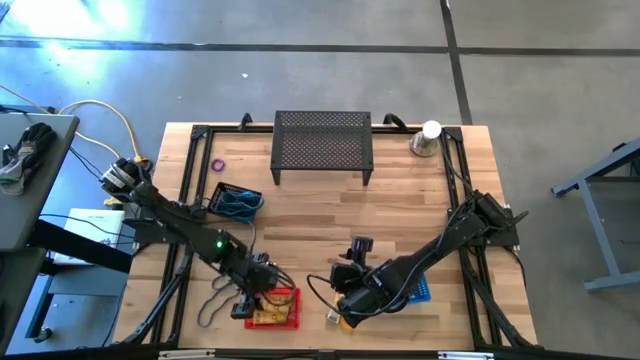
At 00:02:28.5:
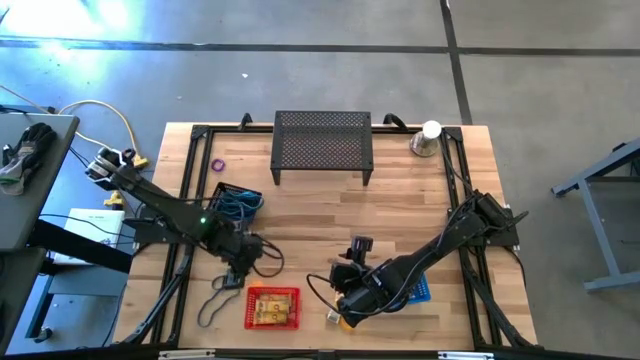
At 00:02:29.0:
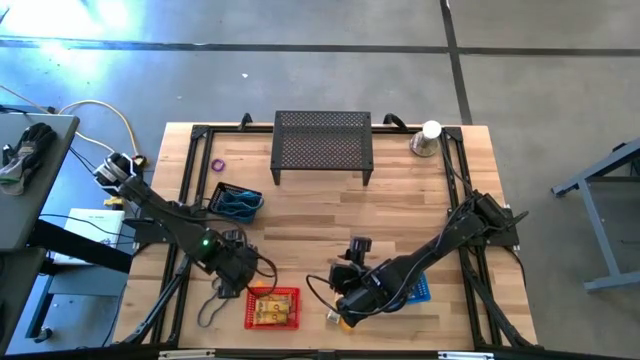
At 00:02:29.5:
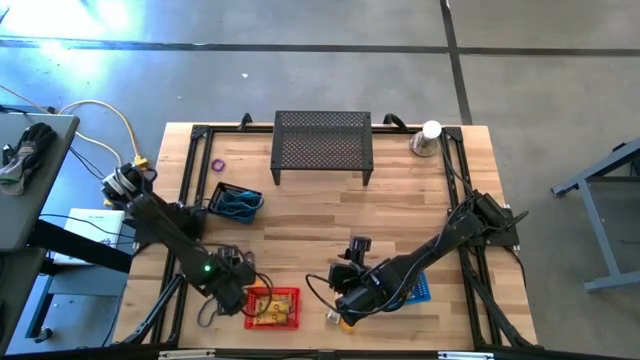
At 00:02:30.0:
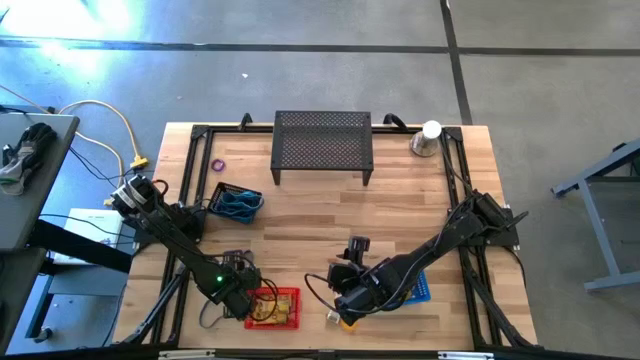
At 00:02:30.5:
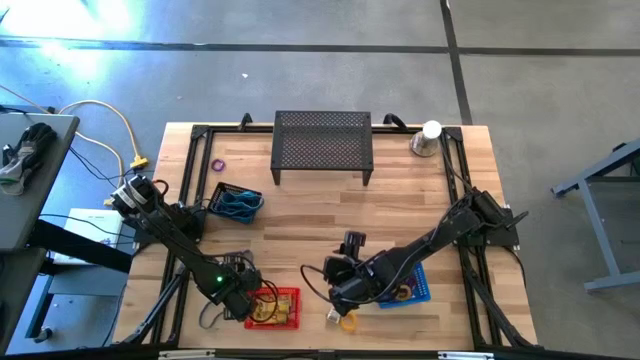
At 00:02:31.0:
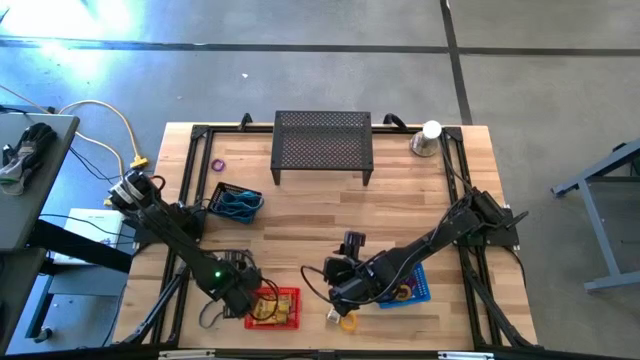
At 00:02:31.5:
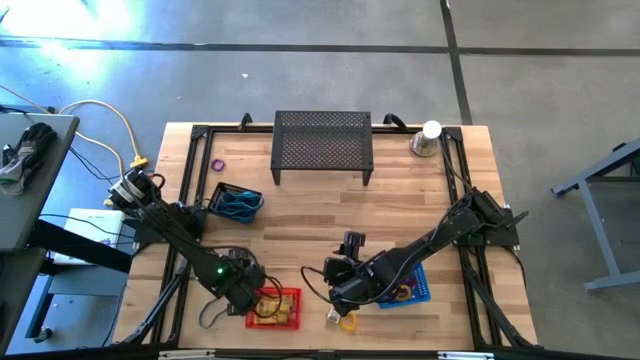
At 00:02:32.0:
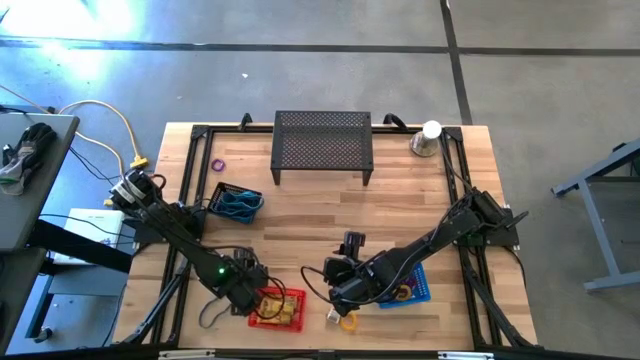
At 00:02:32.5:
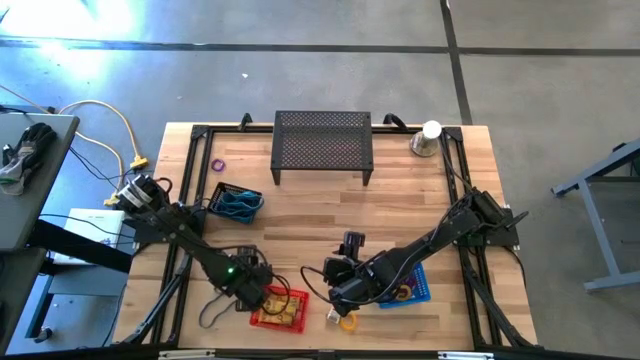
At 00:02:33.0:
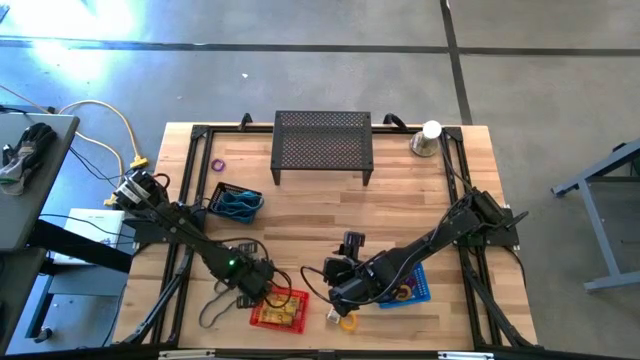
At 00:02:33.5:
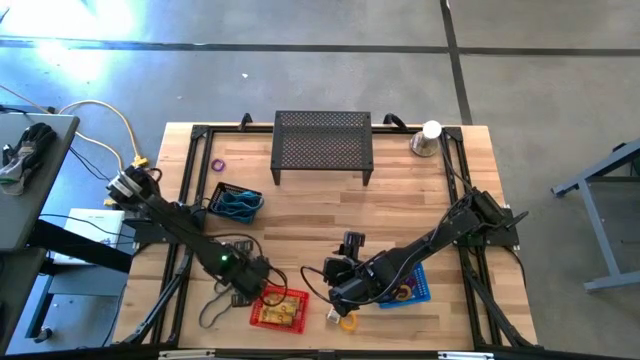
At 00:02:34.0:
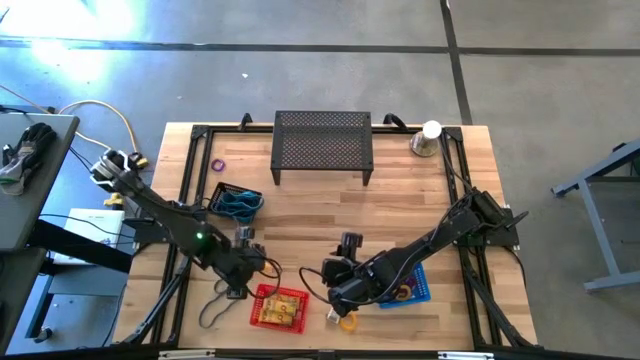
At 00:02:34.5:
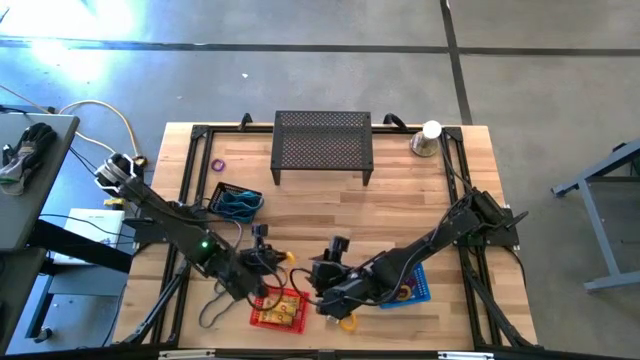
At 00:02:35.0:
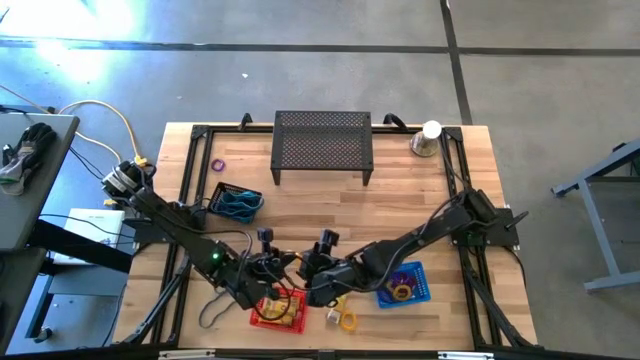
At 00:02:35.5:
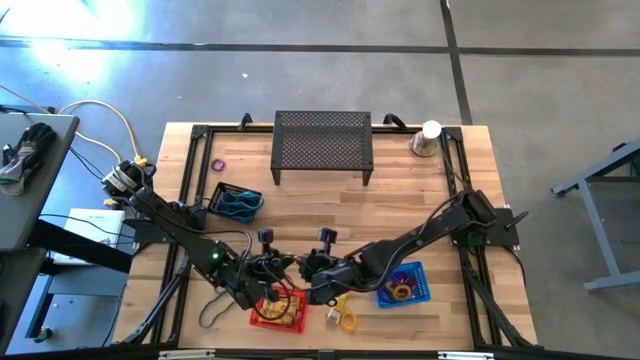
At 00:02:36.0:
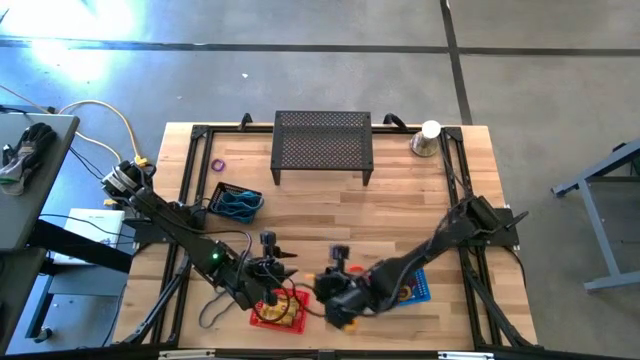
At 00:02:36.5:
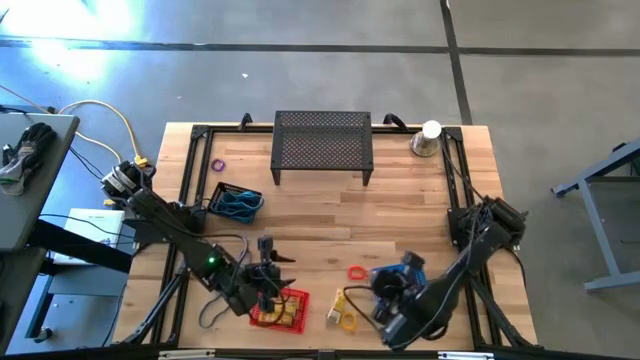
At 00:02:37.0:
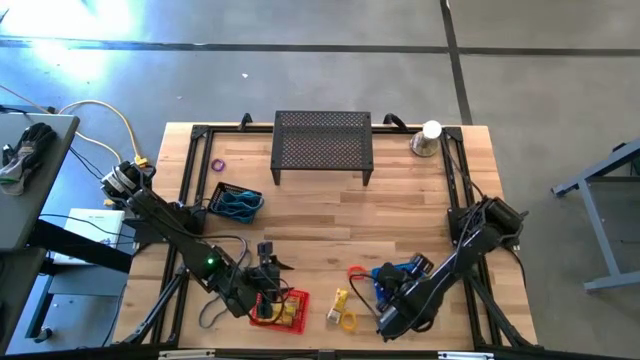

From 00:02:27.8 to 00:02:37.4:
Task: Pick & Place Office Desk Supplies
Put the yellow spring keychain into the blue bin

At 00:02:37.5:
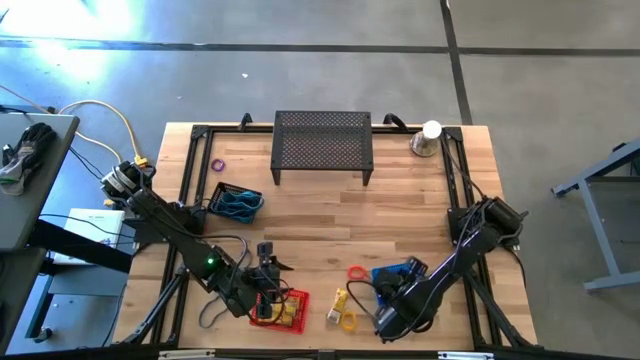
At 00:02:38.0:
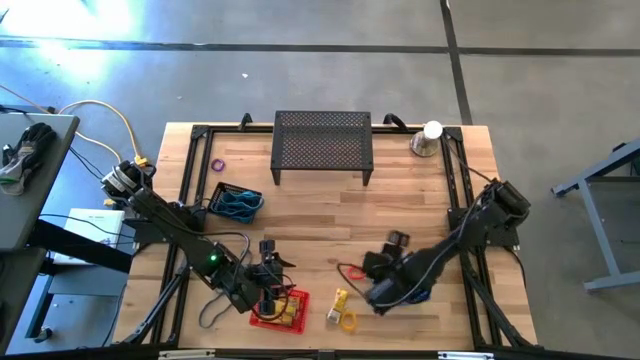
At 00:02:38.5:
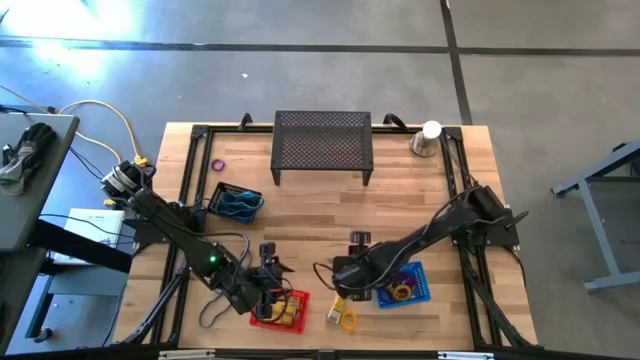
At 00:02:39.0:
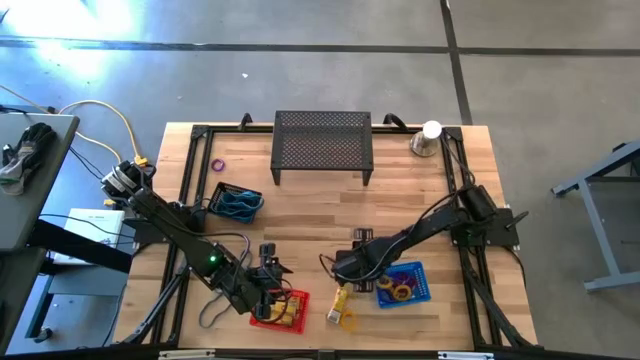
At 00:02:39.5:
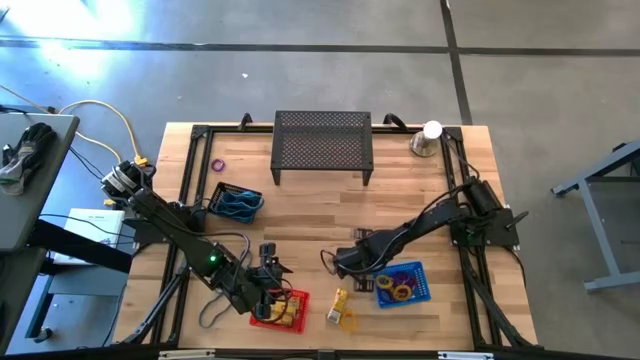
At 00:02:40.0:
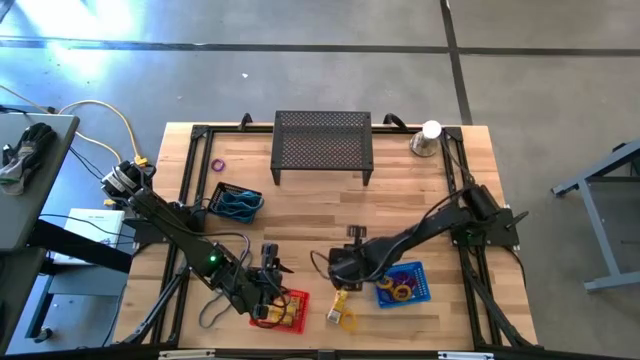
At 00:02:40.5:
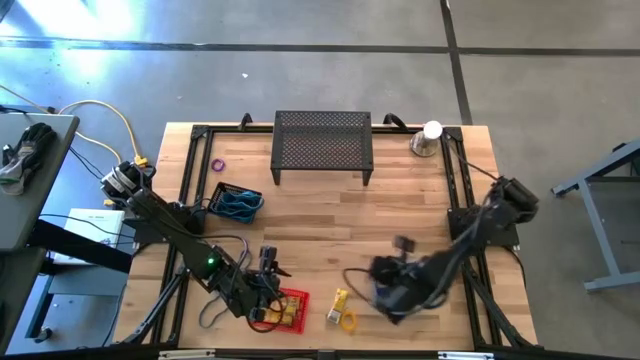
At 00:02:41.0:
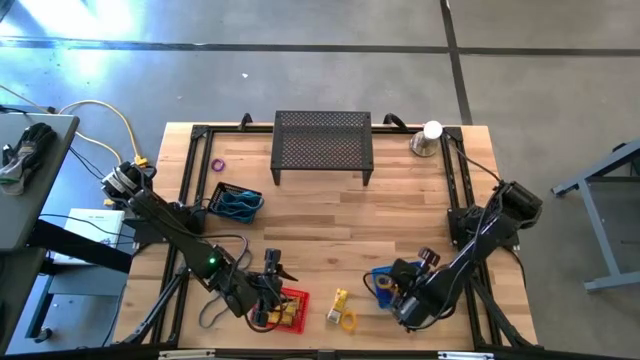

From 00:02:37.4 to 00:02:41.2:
Put the orange spring keychain into the blue bin

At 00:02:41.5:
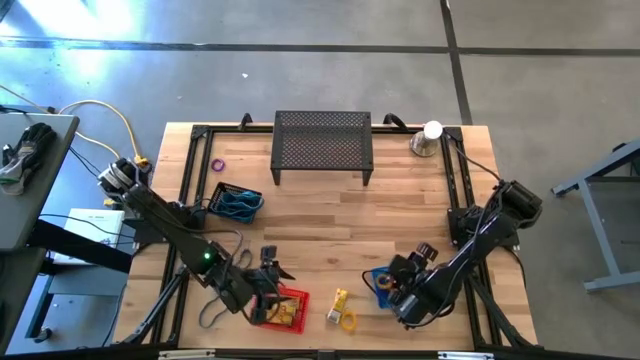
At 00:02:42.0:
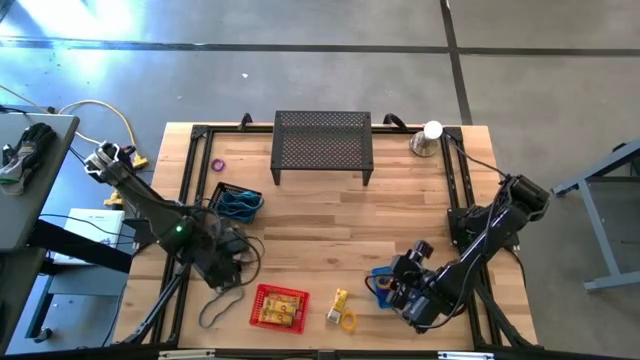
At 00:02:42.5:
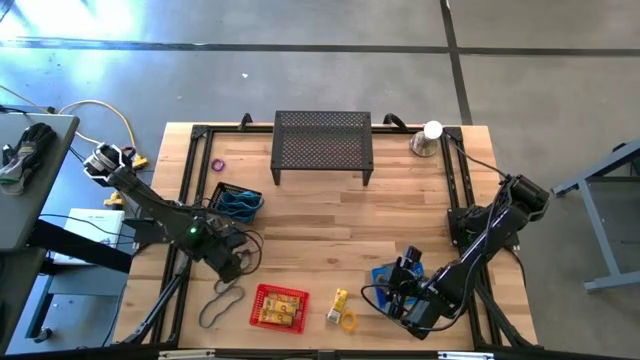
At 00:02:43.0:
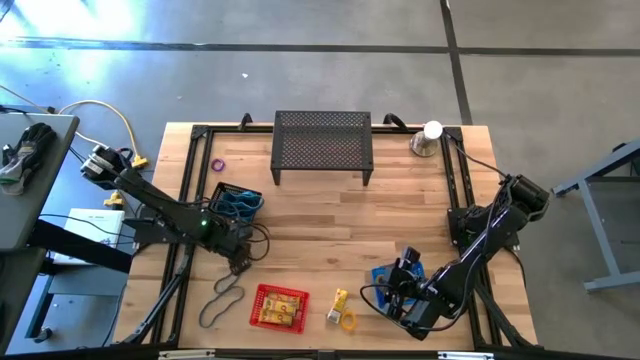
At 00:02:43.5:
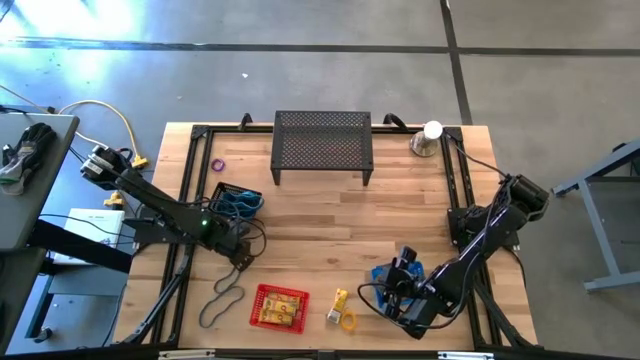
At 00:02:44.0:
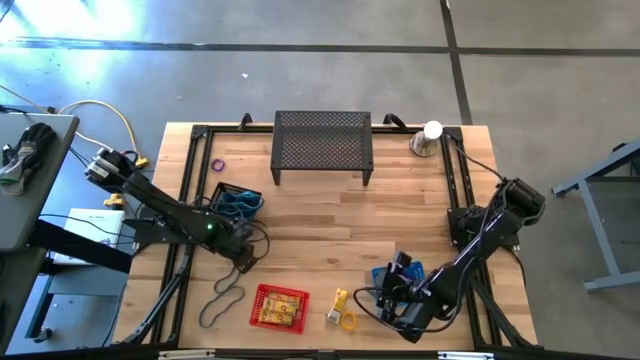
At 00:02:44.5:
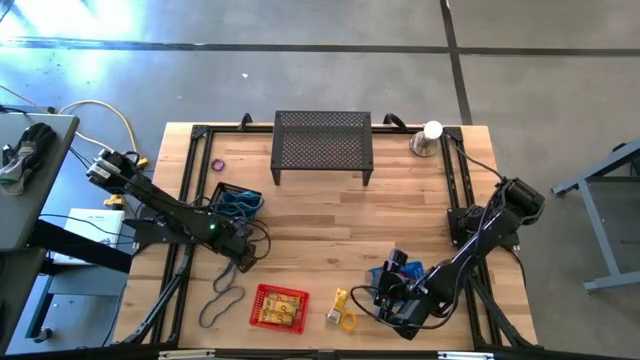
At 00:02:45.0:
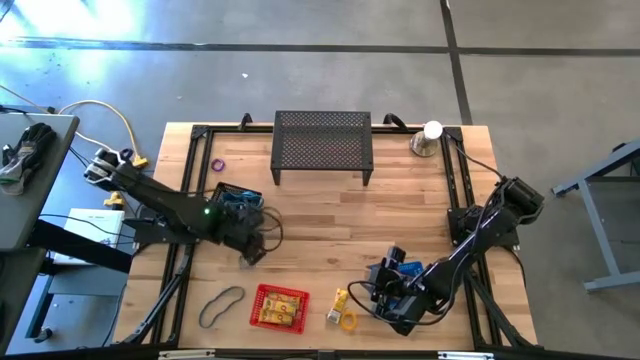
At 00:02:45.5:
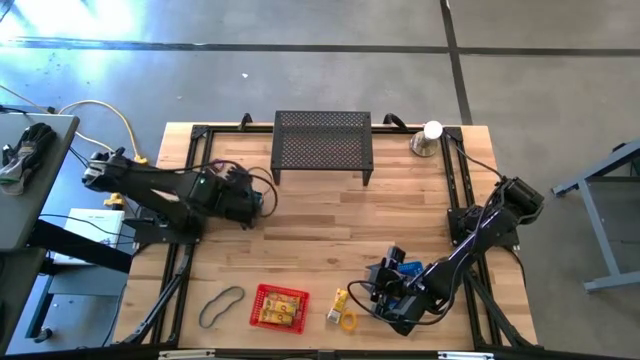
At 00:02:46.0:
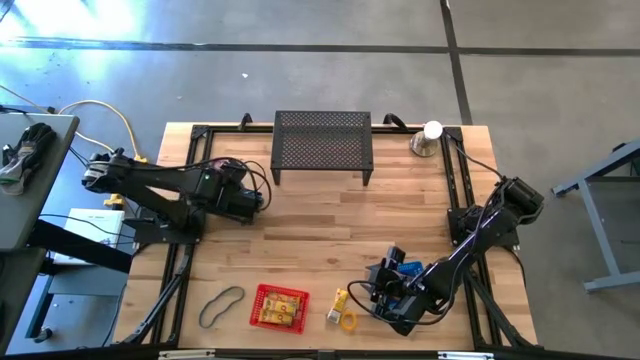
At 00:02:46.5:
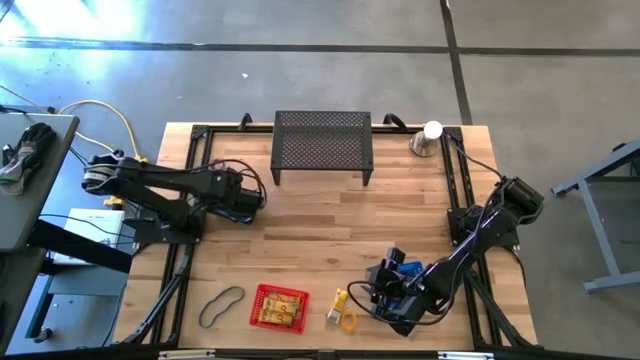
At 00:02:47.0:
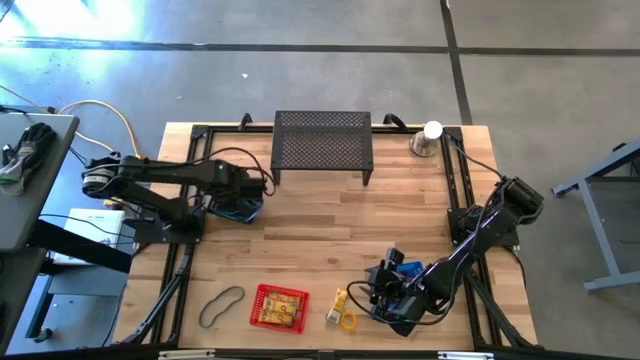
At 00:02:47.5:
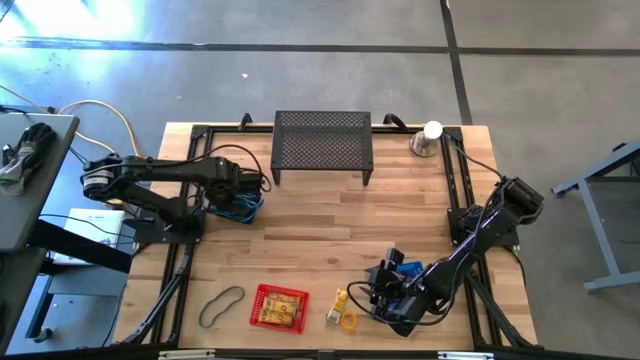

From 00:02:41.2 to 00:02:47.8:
Put the blue rubber band into the black bin
